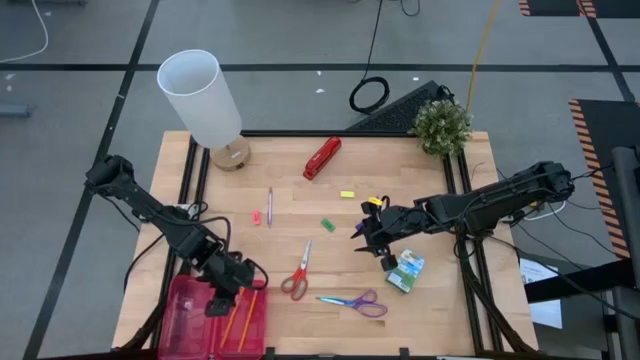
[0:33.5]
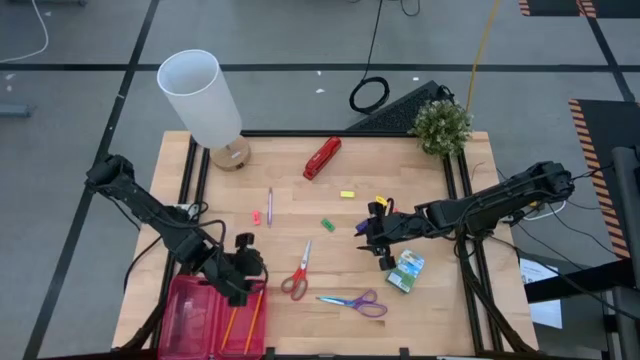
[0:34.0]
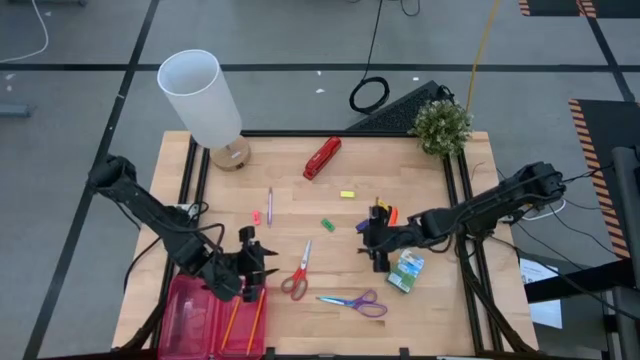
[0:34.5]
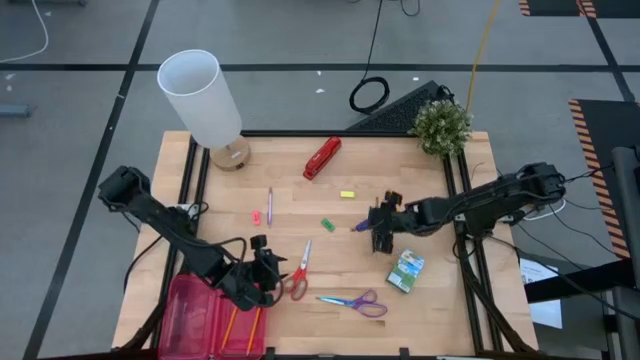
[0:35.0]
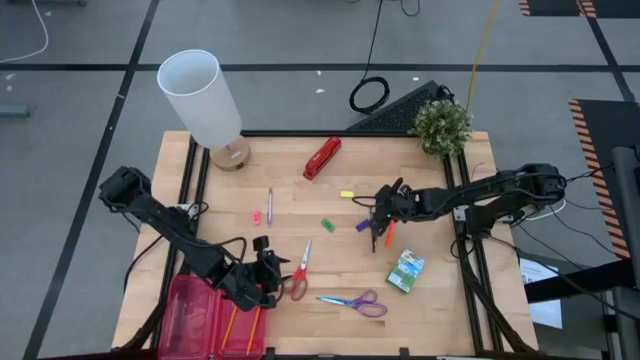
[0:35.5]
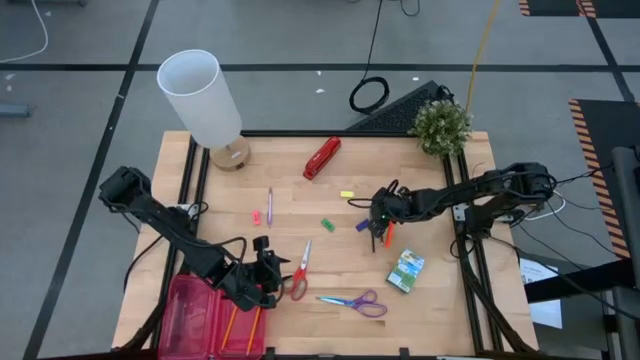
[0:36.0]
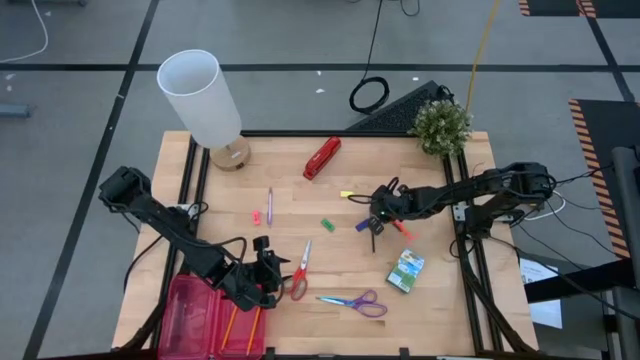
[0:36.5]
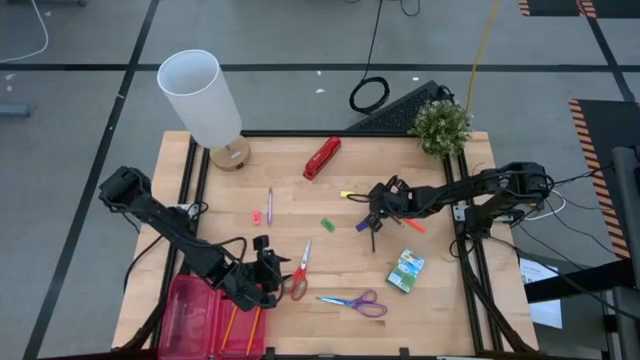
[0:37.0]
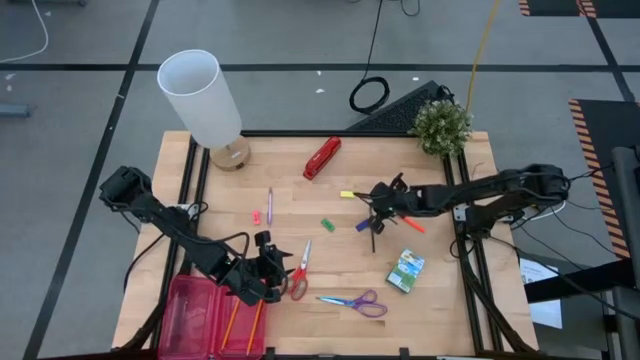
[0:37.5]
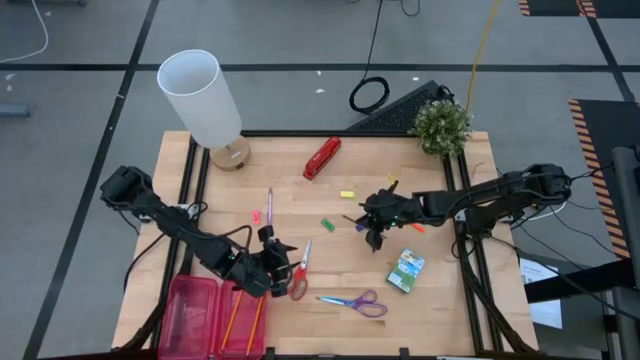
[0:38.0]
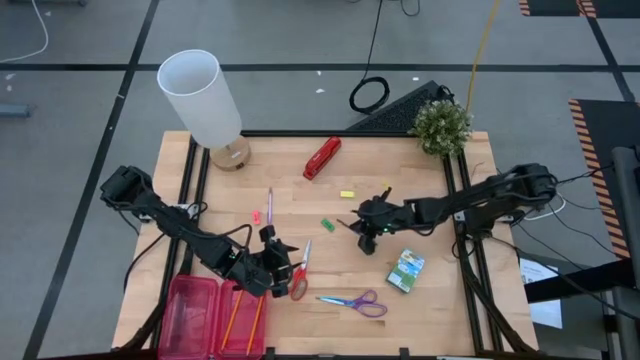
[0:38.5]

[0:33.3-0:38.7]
Task: Pack school essentials
Put the right black pencil into the red supply box

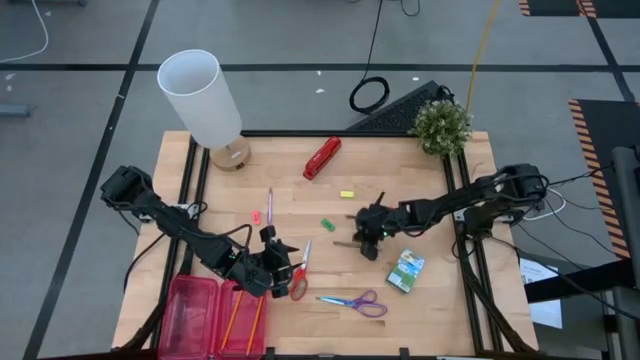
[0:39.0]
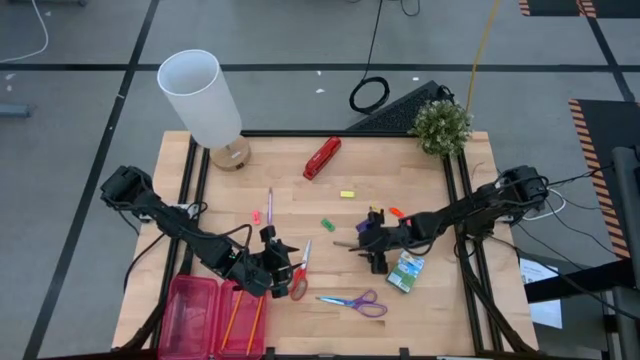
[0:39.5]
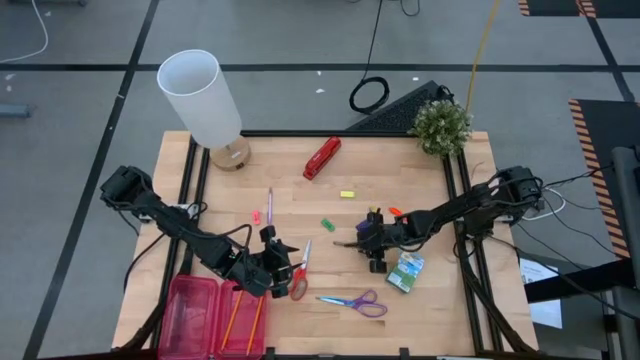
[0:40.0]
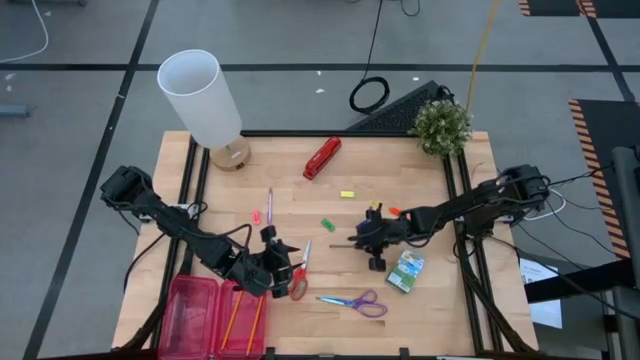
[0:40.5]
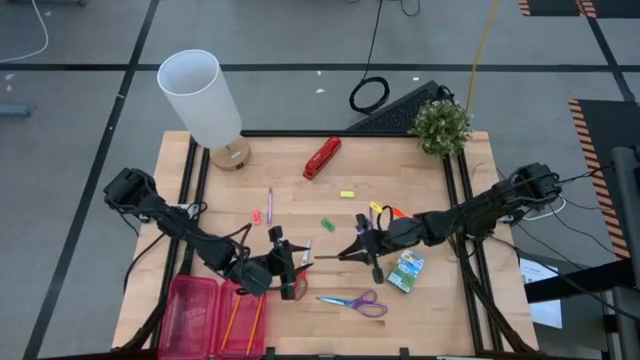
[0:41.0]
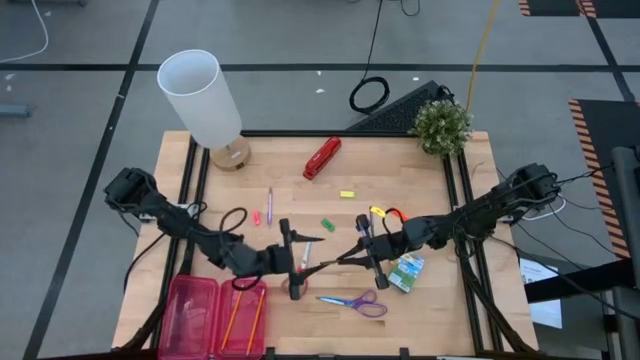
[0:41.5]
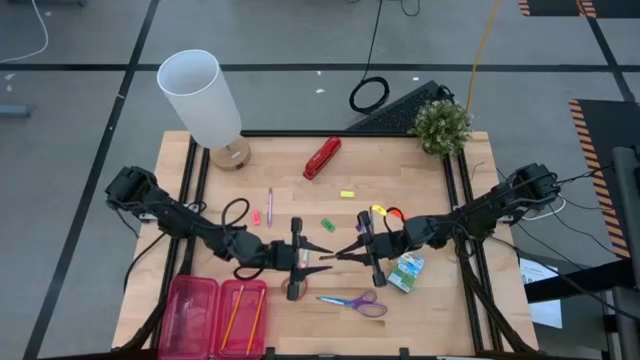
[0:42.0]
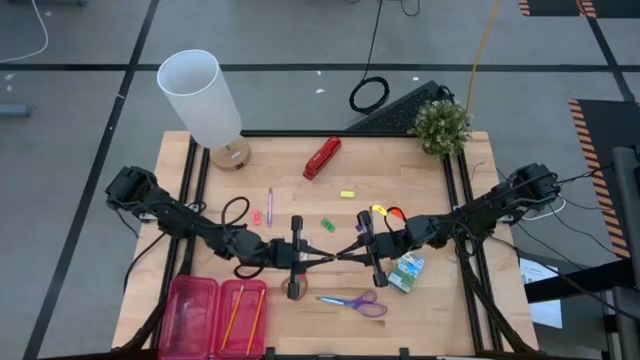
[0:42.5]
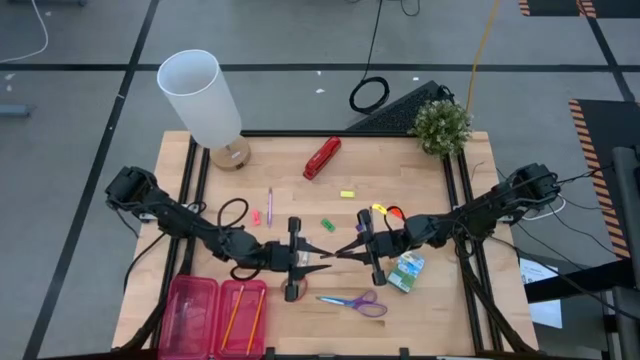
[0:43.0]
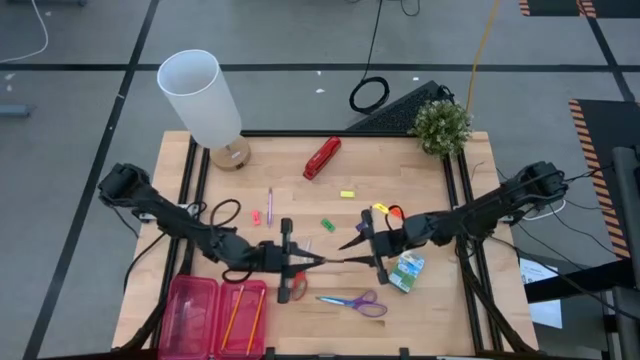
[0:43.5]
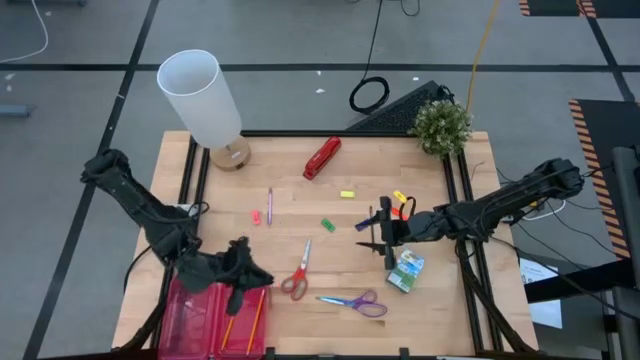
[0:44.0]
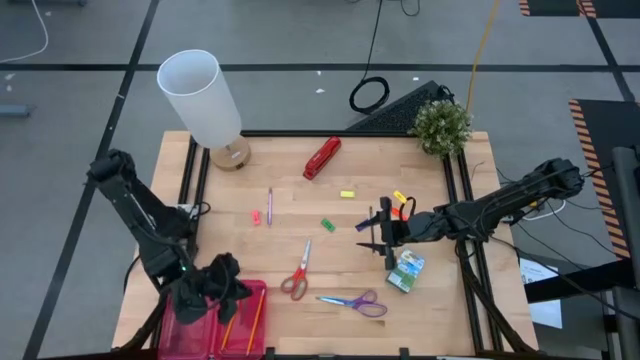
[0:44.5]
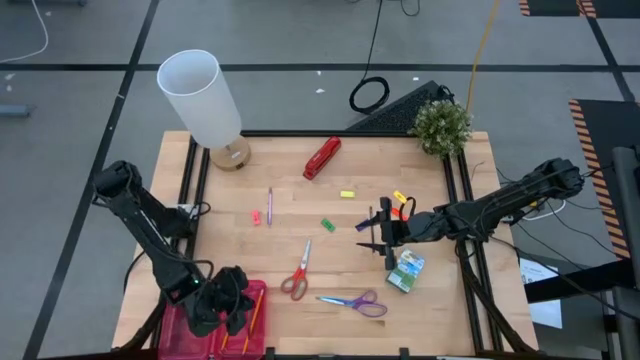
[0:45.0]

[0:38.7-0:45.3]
Put the left black pencil into the red supply box

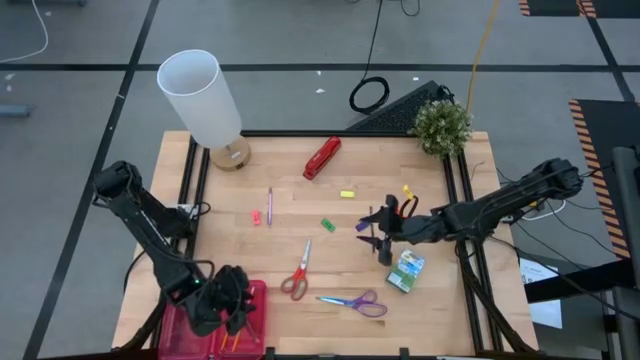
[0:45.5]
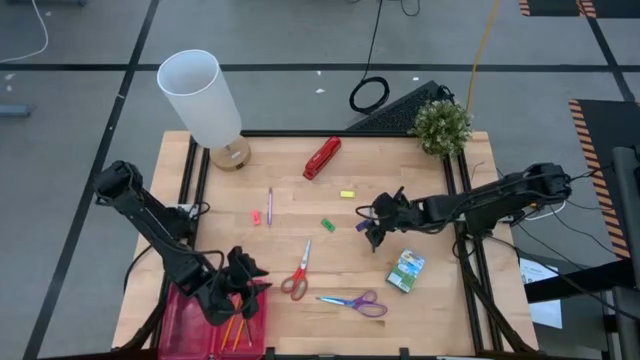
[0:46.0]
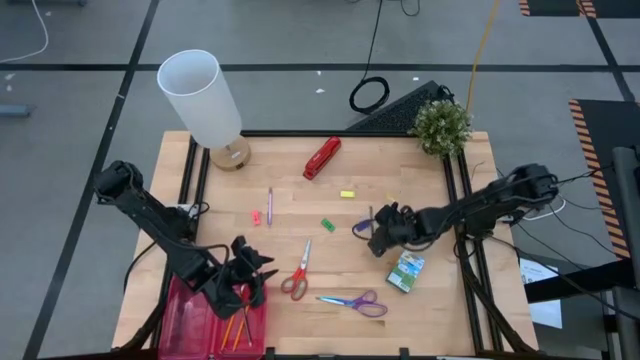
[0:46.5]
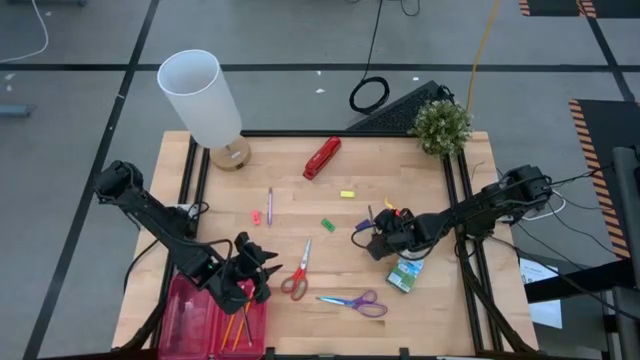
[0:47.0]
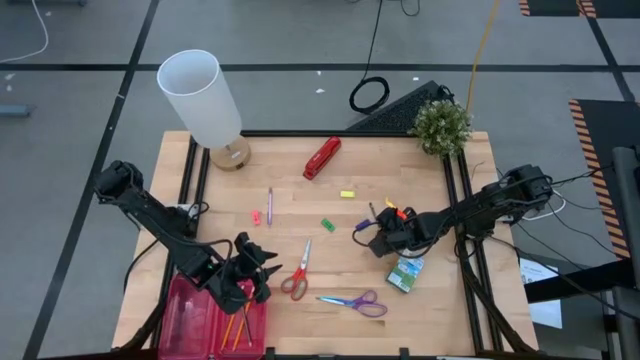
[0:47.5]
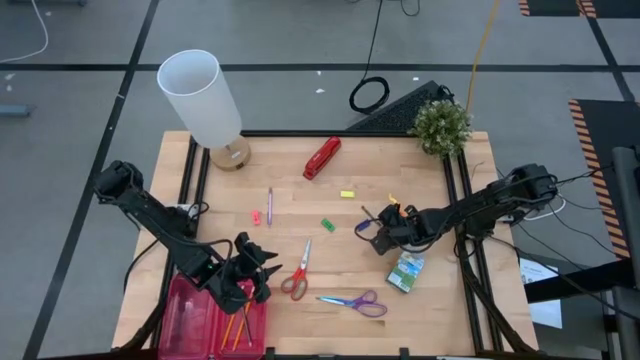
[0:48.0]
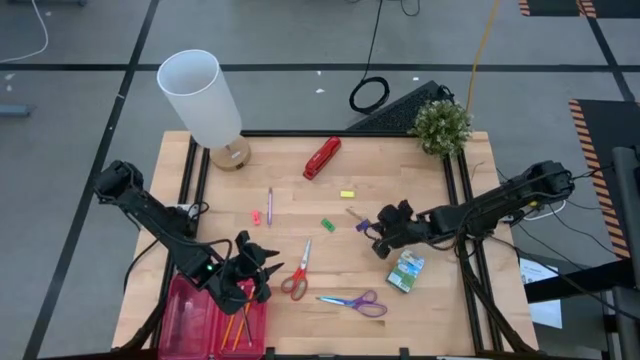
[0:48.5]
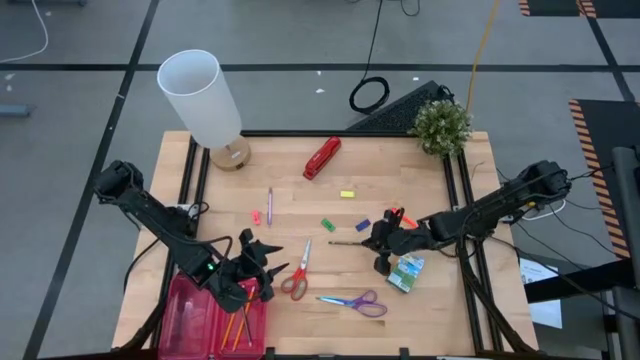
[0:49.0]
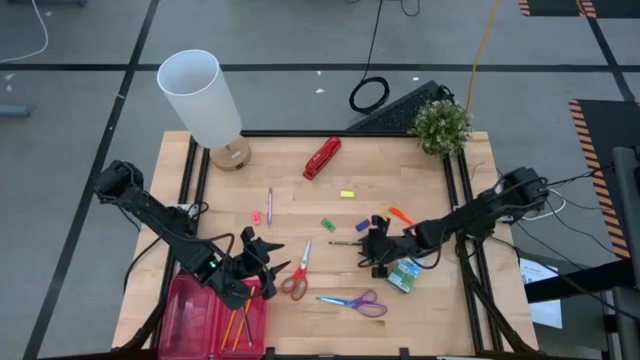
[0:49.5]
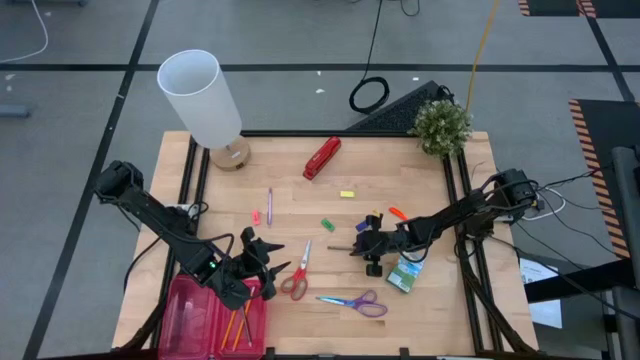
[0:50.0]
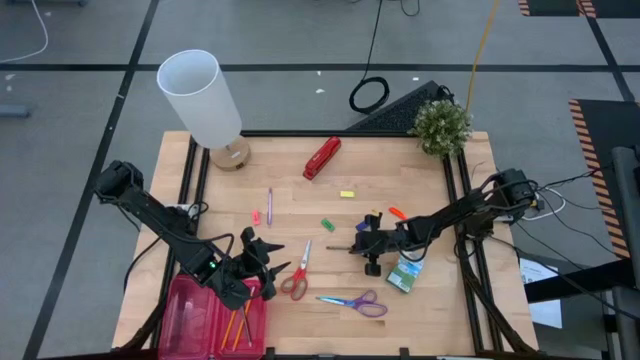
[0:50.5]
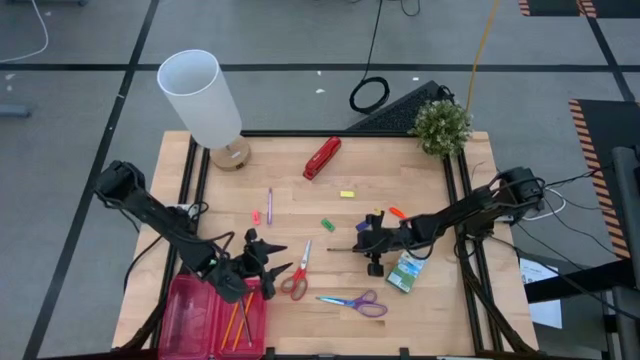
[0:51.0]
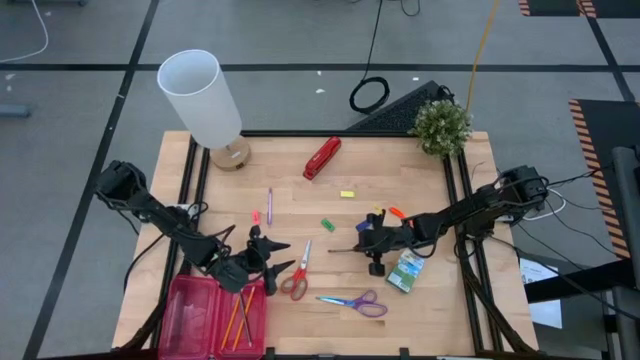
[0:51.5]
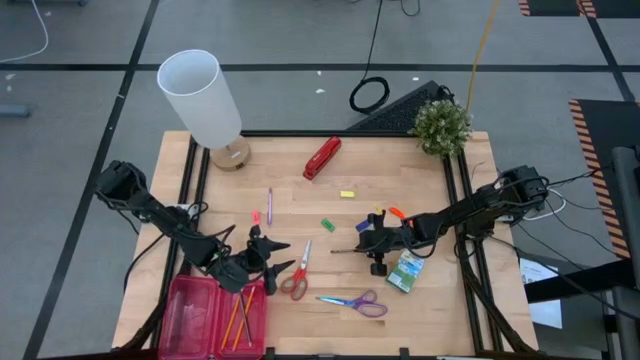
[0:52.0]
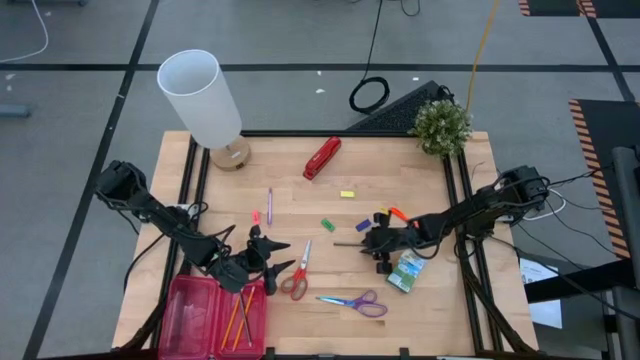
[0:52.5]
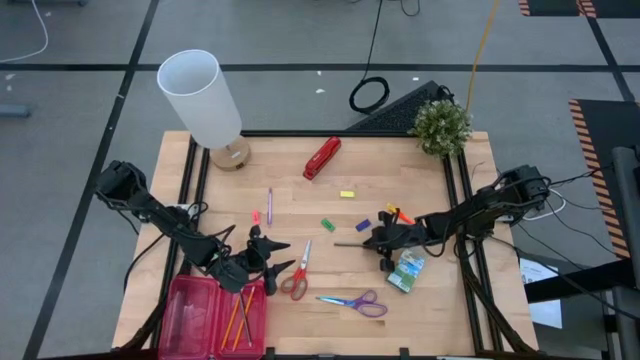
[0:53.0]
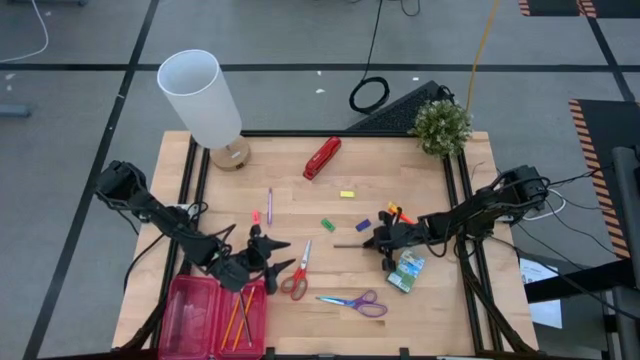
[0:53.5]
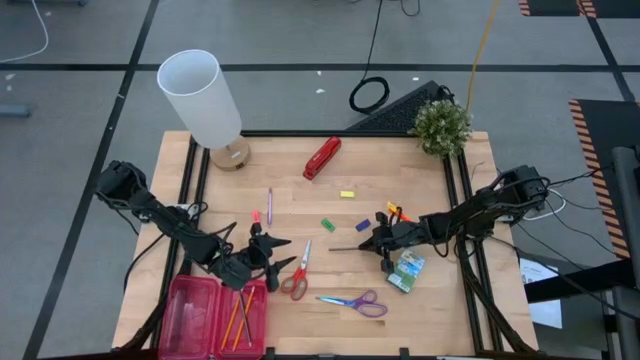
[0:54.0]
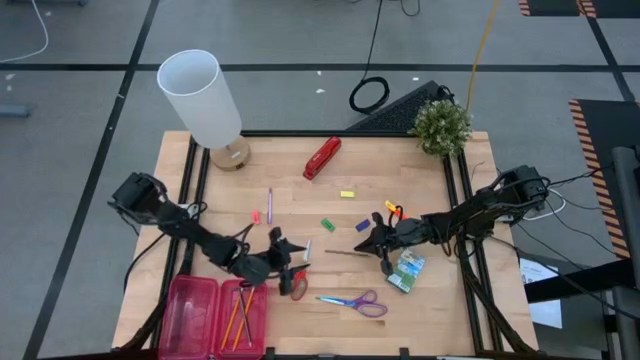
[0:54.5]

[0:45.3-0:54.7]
Put the black pencil into the red supply box
